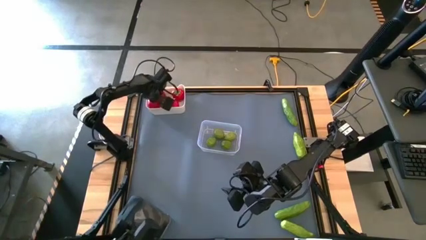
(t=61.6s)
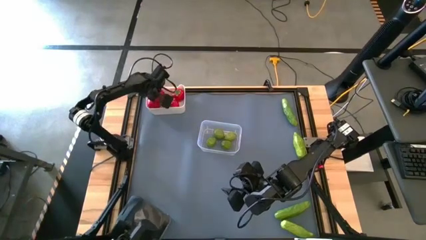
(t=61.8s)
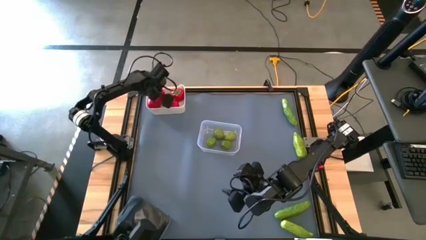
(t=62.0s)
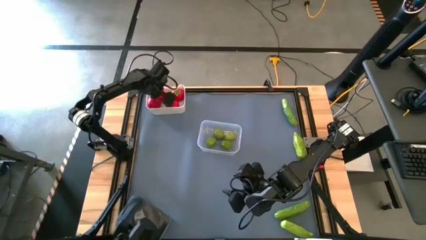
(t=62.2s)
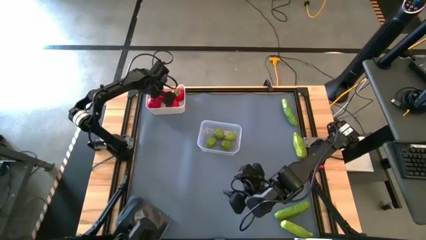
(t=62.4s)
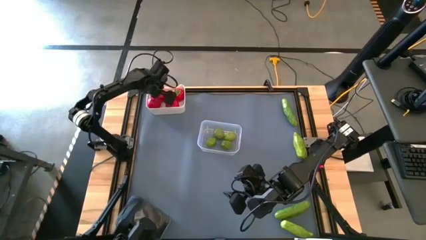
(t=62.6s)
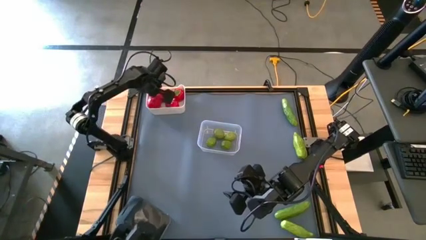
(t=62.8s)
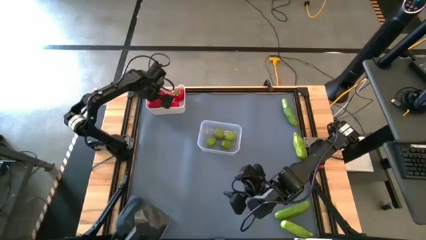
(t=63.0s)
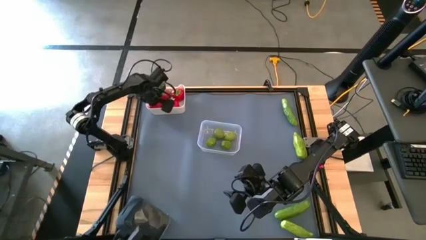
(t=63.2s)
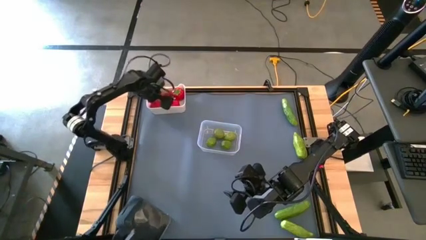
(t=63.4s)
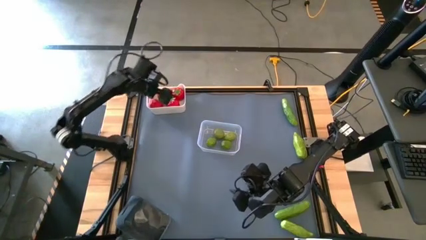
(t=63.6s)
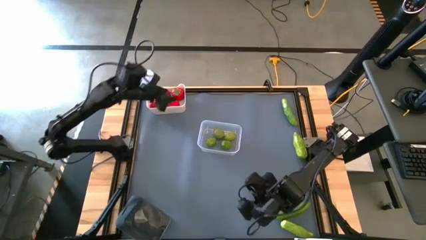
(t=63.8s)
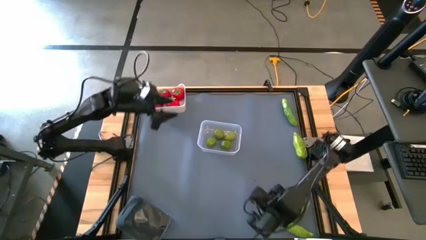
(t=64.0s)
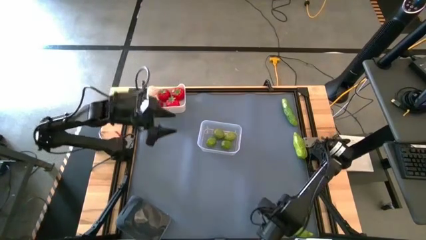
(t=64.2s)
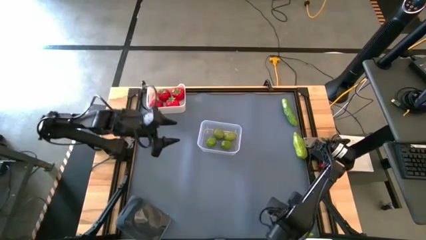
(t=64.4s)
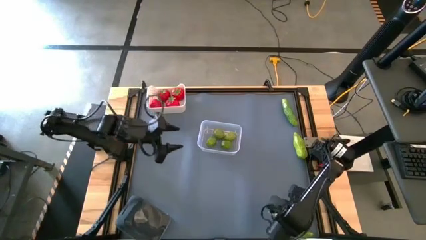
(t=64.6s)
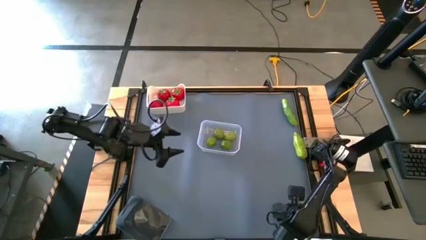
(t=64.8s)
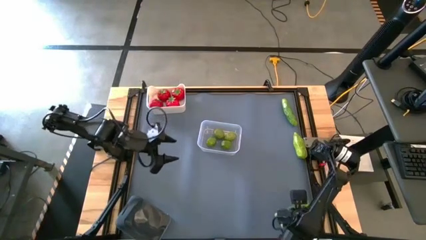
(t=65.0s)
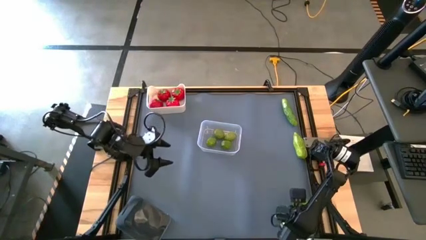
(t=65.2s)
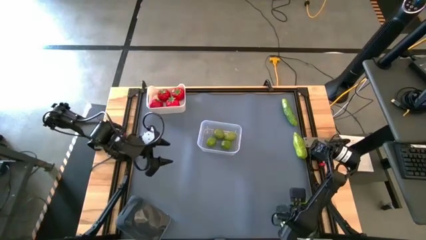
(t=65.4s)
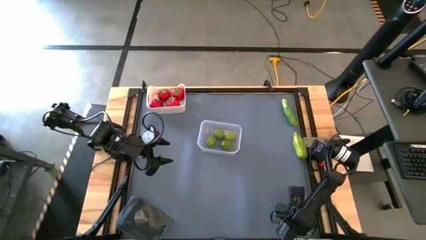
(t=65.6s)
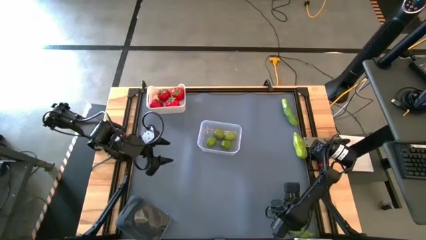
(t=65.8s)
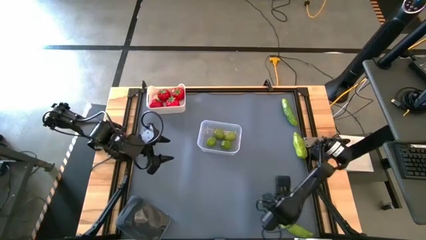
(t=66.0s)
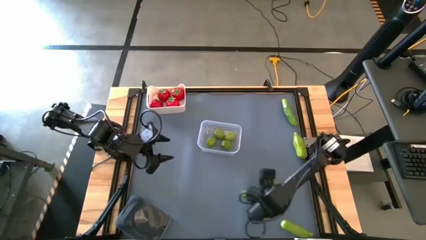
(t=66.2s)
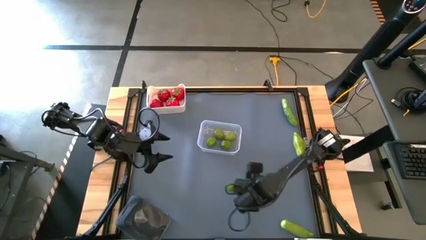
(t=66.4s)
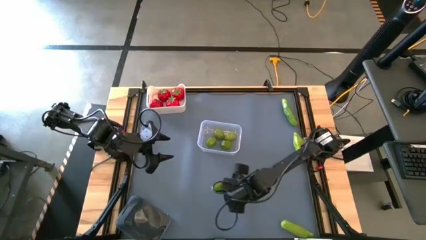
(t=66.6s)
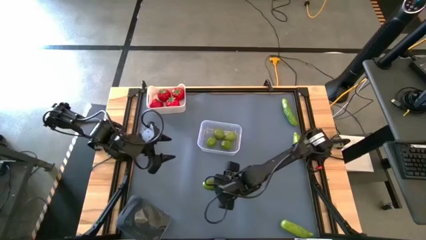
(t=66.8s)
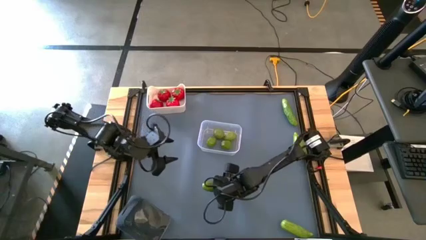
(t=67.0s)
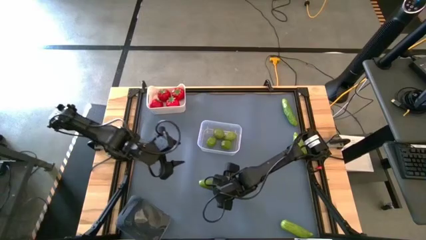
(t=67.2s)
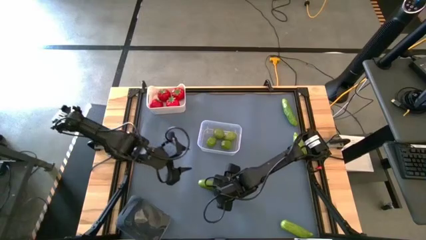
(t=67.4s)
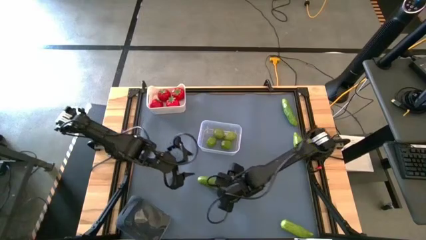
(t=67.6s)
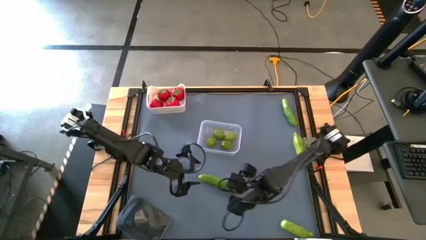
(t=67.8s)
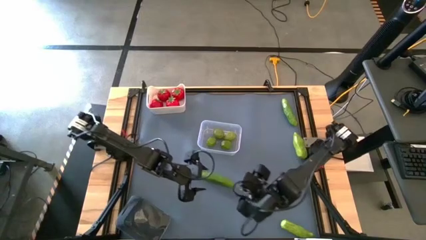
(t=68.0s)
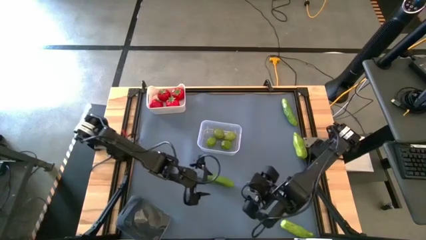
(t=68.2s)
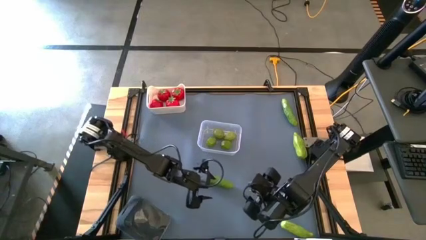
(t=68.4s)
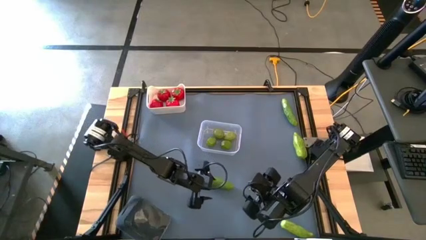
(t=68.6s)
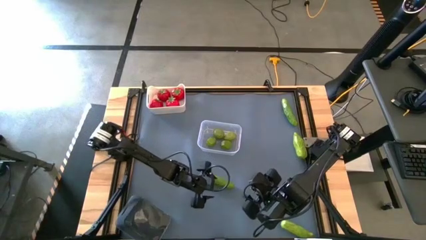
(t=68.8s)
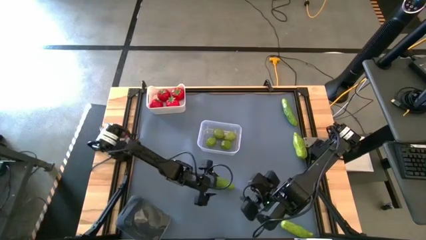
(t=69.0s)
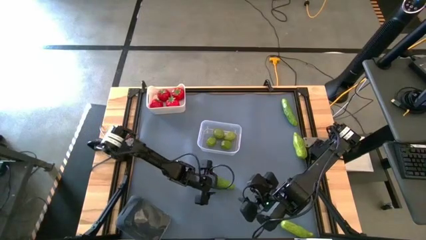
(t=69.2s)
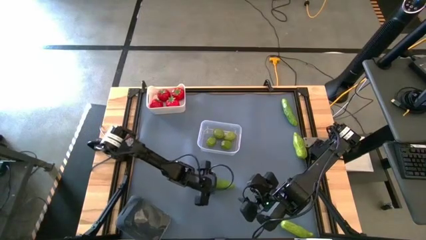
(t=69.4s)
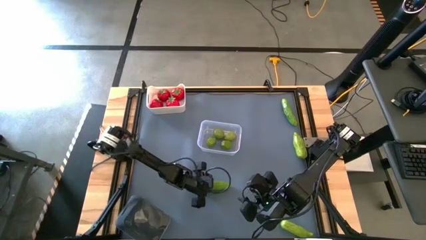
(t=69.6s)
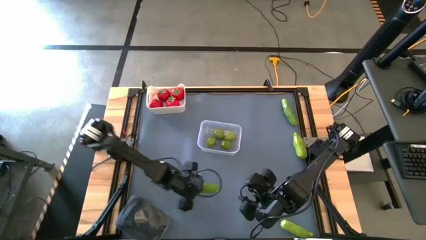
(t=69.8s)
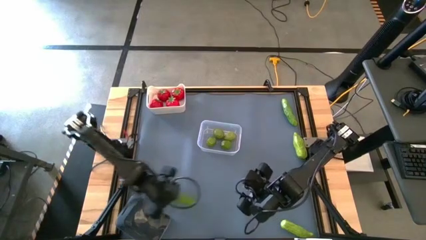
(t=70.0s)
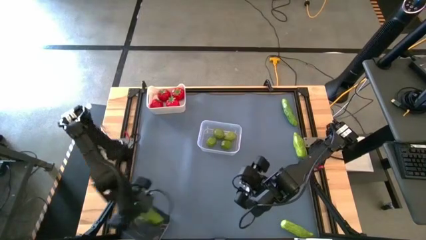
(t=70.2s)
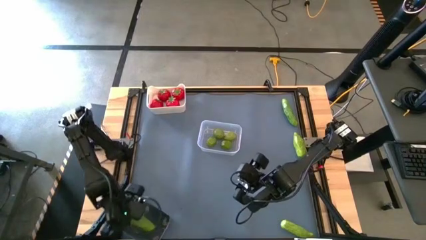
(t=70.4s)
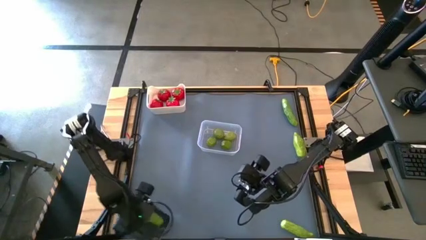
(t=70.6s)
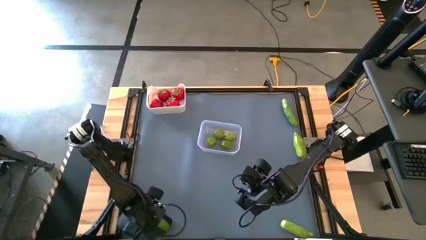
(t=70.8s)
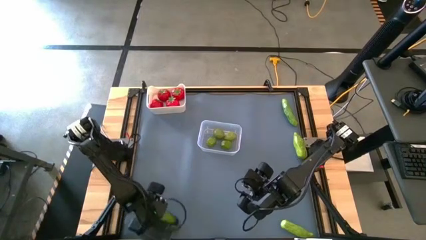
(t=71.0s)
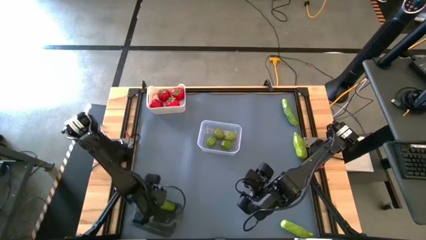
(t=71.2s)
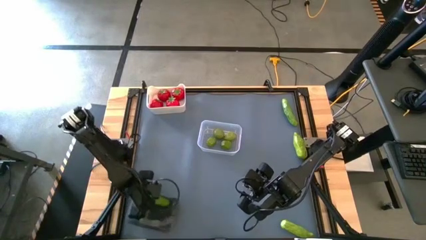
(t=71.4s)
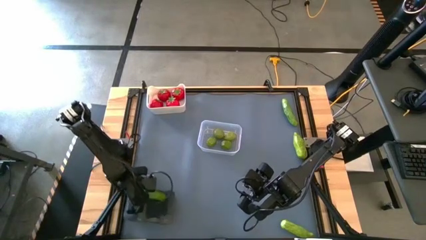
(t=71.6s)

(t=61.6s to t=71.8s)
Task: Sort produce into baskets
Put the bottom right cucumber into the black bin

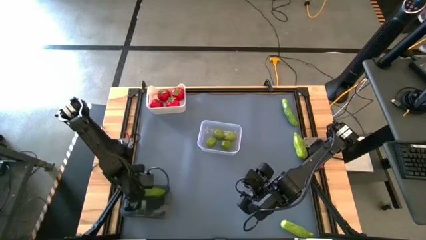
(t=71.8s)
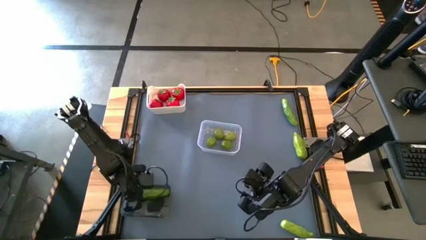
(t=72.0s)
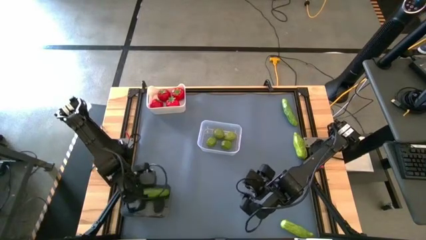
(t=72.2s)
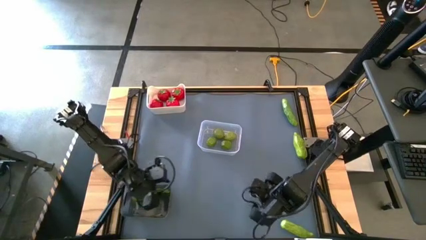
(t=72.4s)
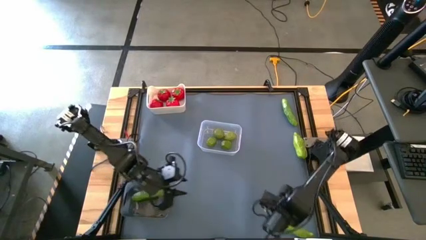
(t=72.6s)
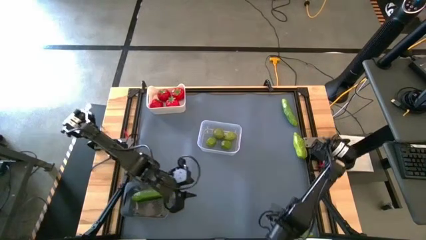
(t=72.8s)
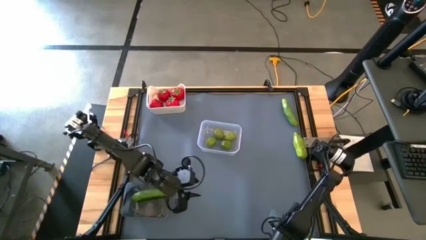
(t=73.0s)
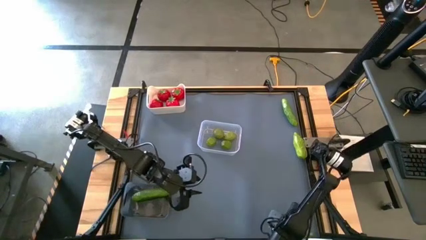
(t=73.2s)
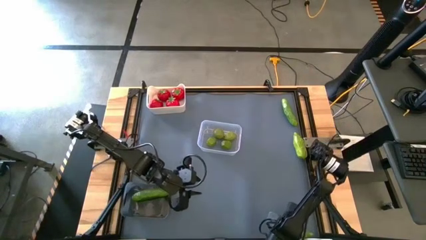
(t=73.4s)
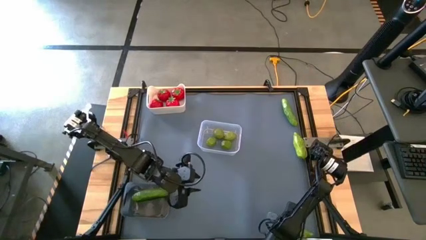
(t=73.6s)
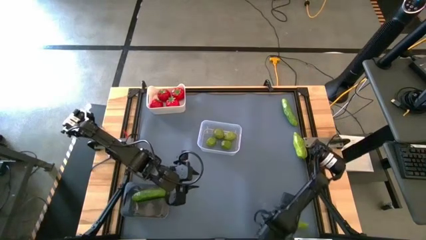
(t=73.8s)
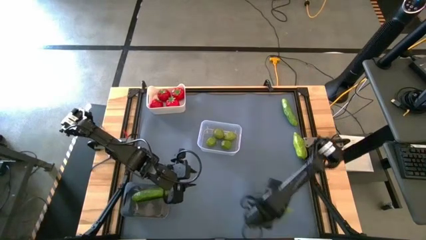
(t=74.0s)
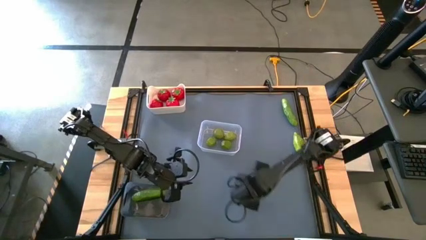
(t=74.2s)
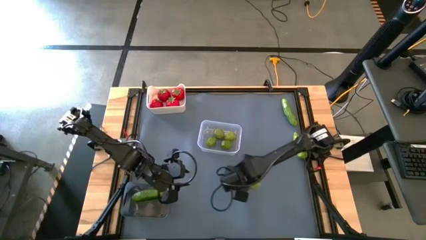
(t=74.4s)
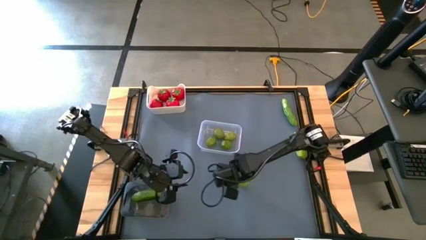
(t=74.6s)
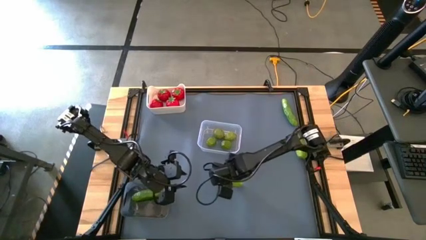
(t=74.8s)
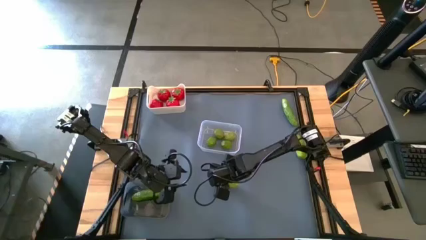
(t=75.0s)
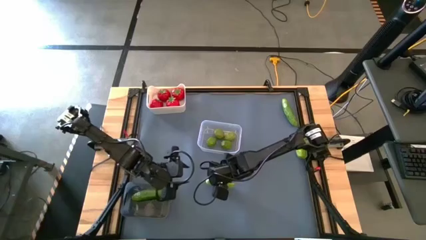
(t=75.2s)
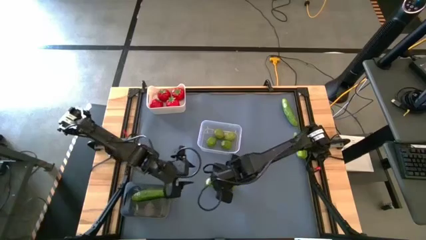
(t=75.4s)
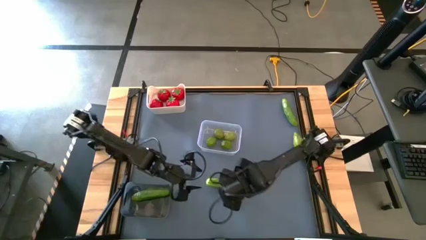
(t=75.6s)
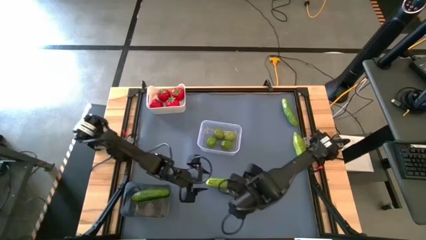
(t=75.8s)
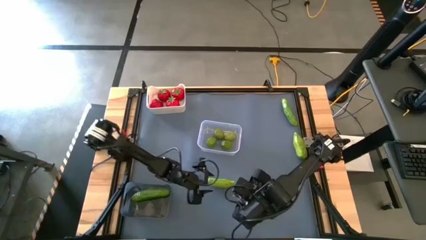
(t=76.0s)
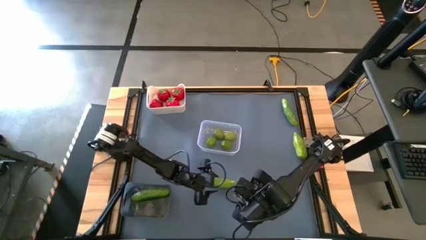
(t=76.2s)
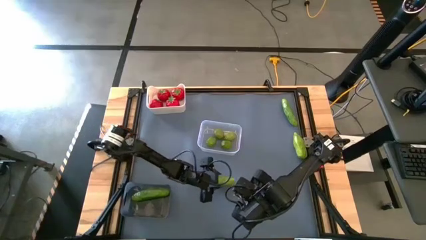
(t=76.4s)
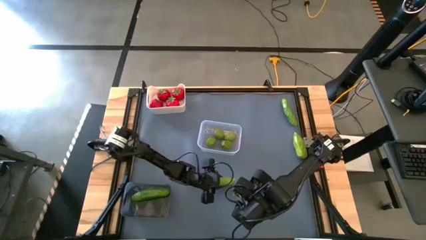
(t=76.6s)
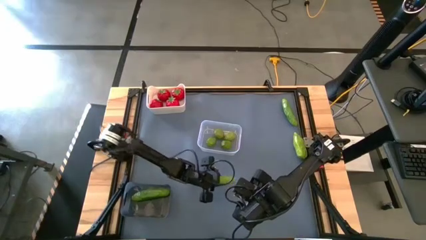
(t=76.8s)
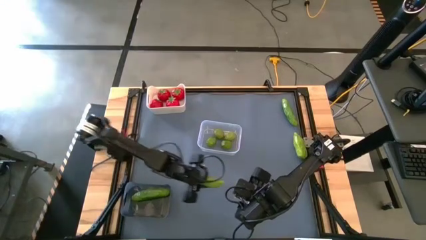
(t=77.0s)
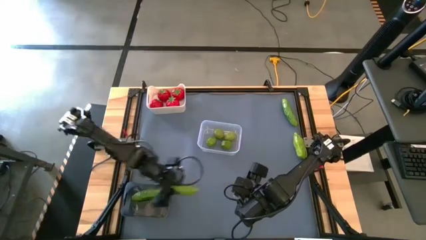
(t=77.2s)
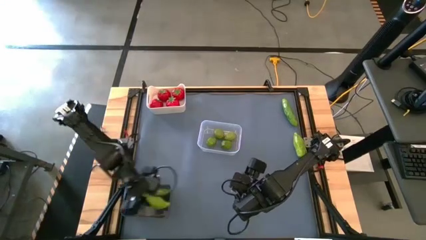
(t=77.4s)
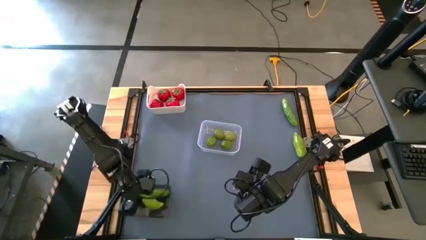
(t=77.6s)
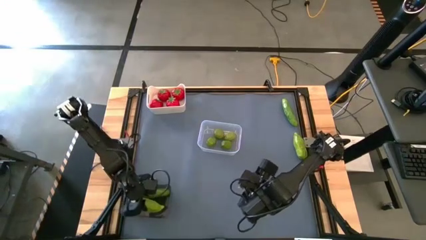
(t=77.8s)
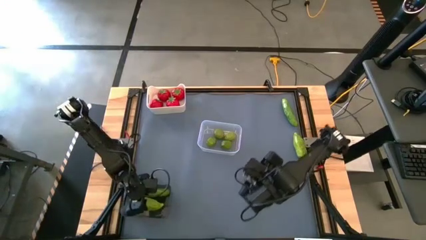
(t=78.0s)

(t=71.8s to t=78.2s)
Put the bottom right cucumber into the black bin
